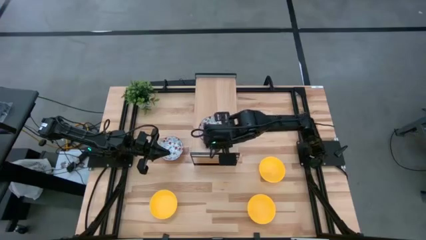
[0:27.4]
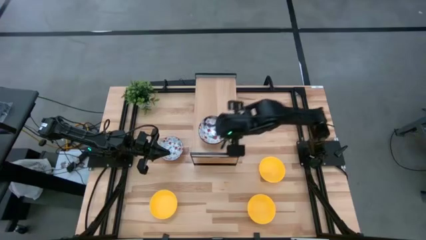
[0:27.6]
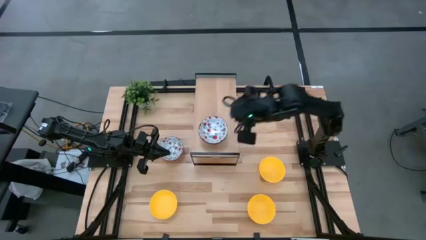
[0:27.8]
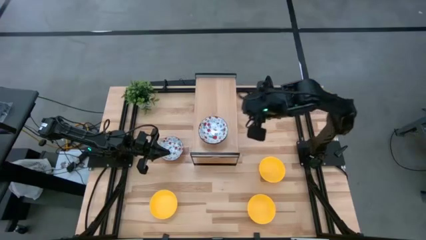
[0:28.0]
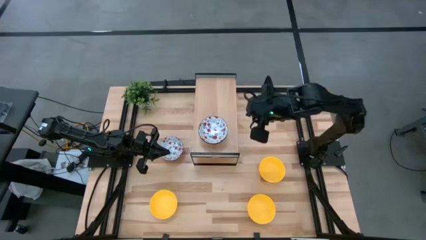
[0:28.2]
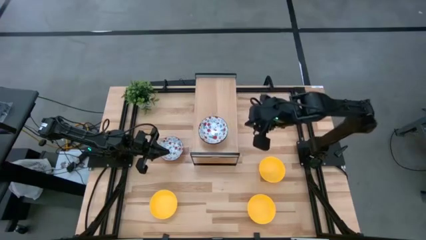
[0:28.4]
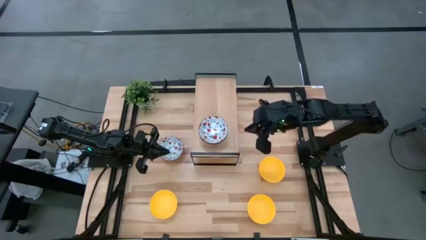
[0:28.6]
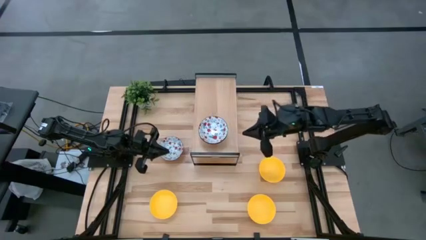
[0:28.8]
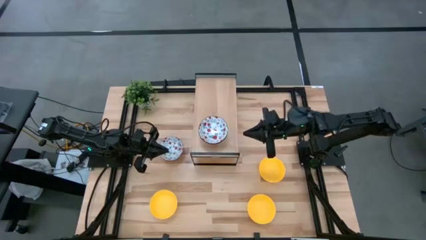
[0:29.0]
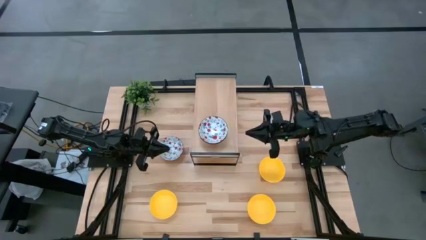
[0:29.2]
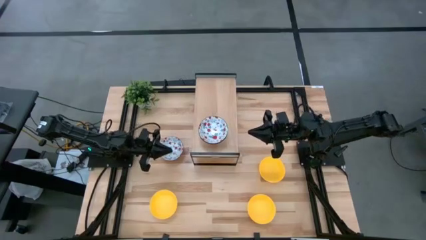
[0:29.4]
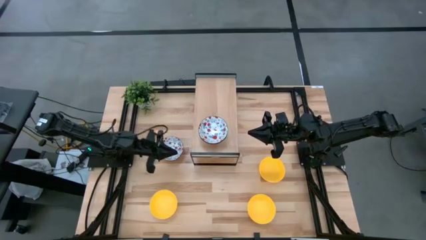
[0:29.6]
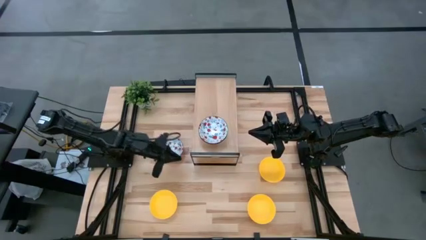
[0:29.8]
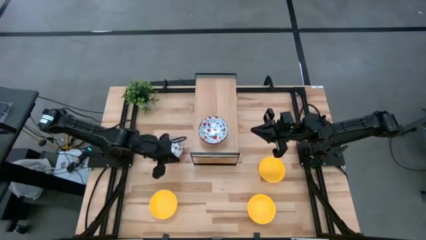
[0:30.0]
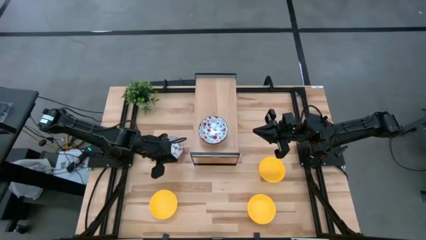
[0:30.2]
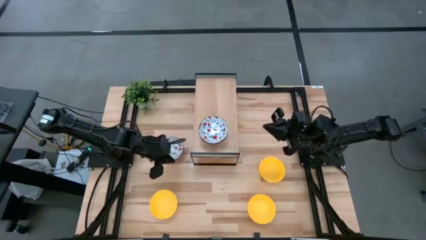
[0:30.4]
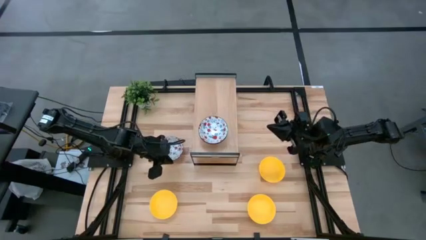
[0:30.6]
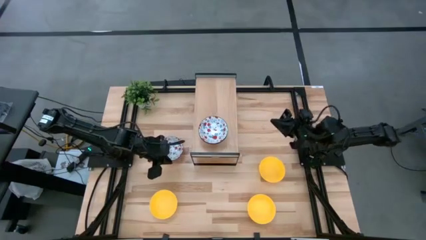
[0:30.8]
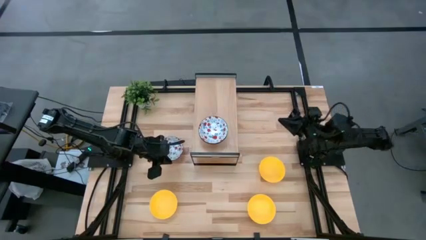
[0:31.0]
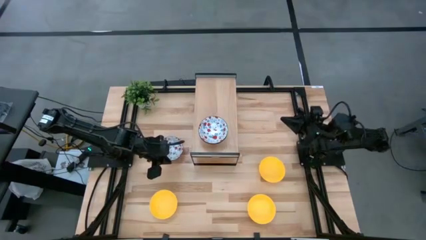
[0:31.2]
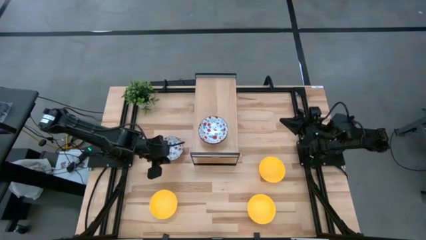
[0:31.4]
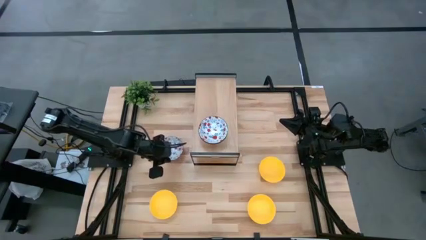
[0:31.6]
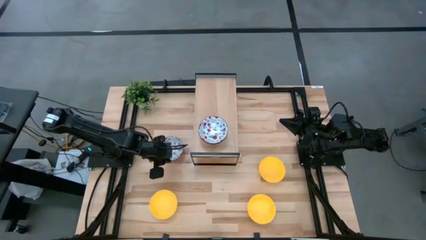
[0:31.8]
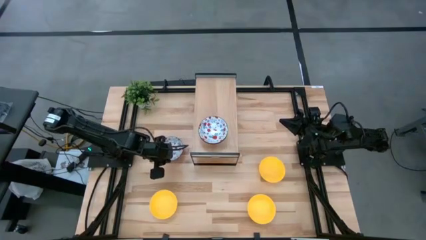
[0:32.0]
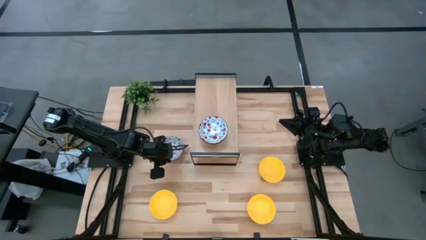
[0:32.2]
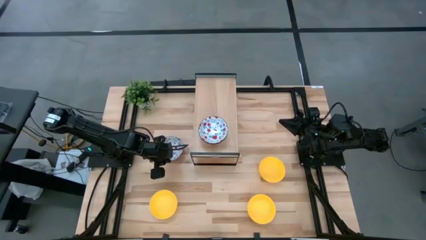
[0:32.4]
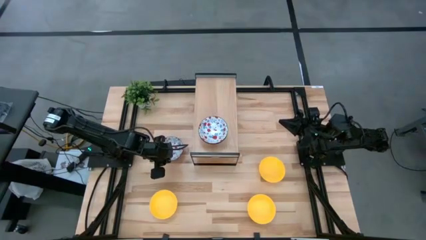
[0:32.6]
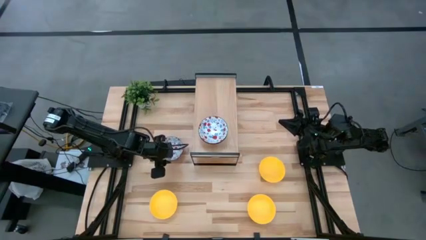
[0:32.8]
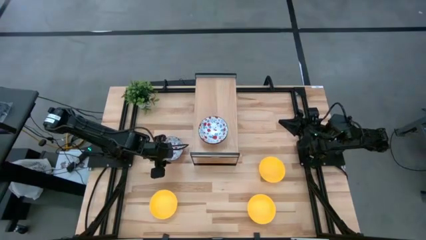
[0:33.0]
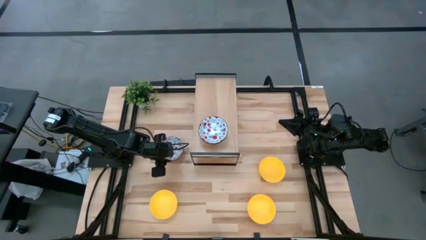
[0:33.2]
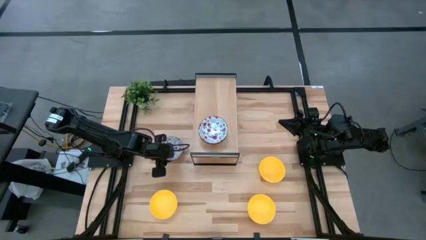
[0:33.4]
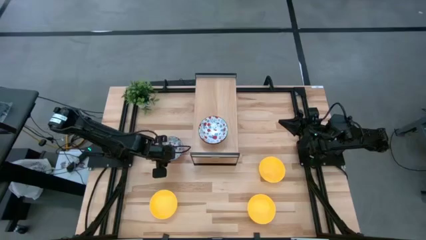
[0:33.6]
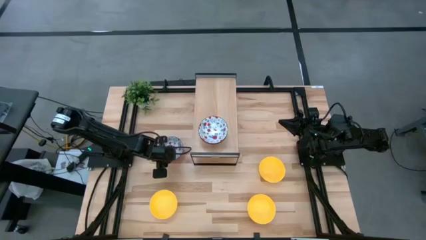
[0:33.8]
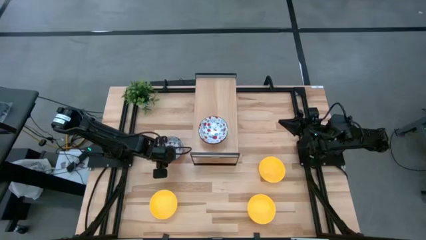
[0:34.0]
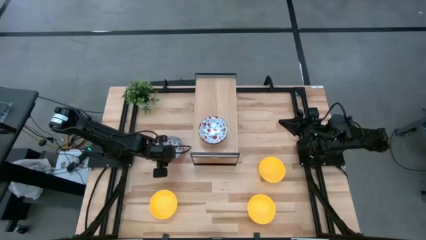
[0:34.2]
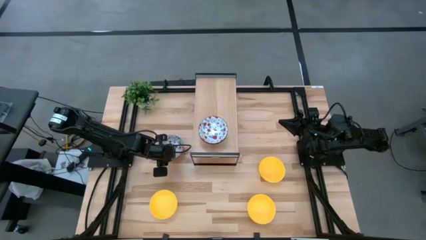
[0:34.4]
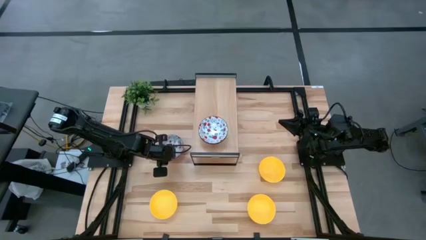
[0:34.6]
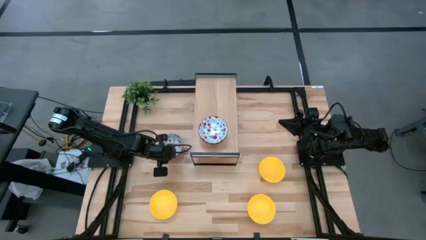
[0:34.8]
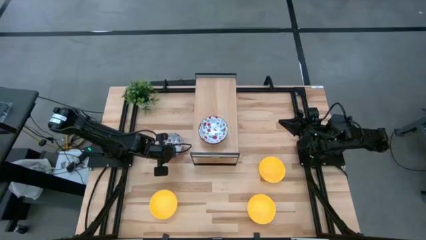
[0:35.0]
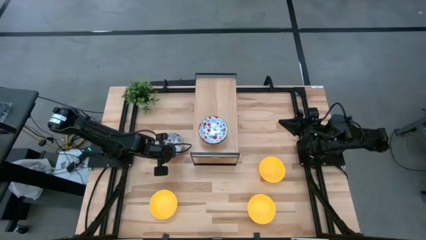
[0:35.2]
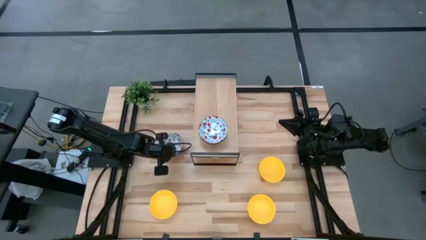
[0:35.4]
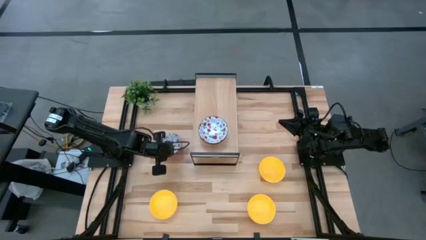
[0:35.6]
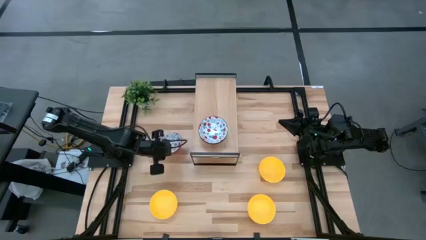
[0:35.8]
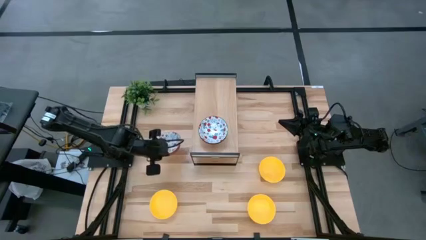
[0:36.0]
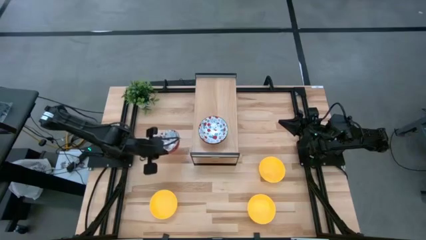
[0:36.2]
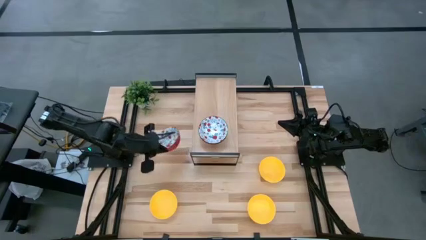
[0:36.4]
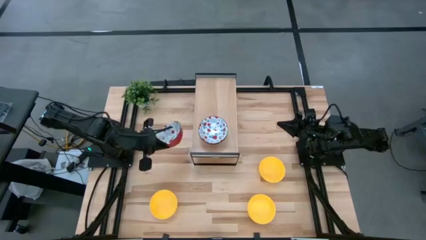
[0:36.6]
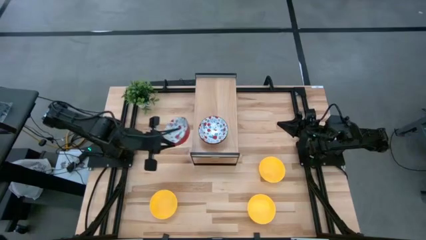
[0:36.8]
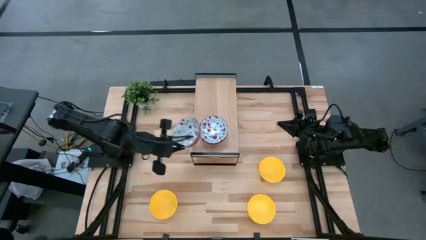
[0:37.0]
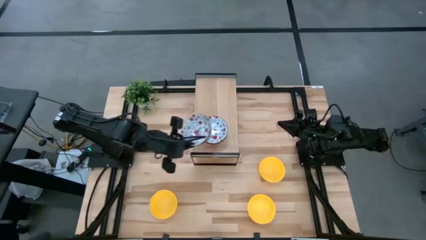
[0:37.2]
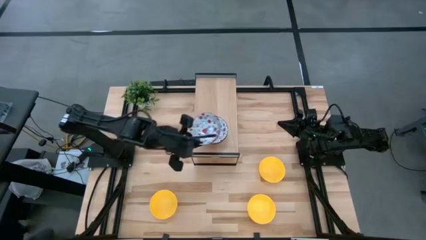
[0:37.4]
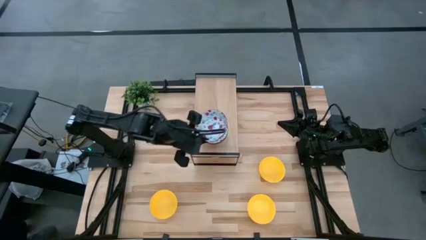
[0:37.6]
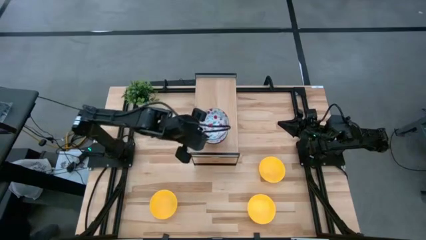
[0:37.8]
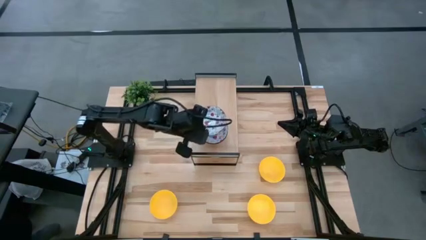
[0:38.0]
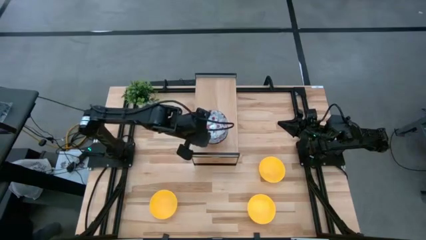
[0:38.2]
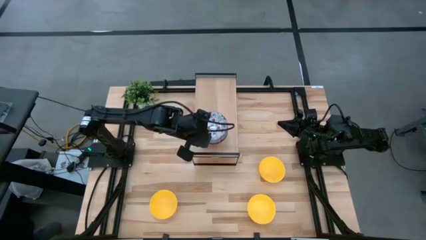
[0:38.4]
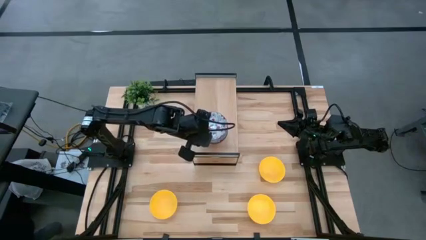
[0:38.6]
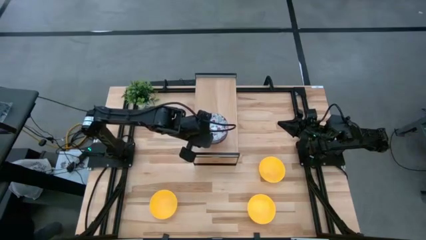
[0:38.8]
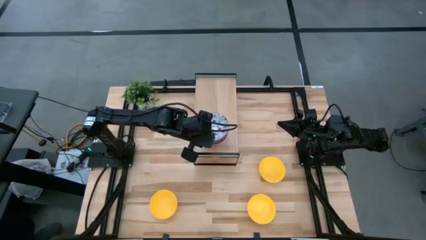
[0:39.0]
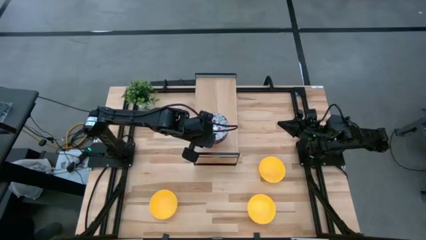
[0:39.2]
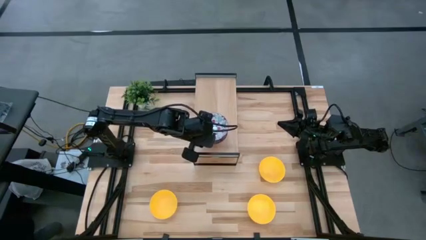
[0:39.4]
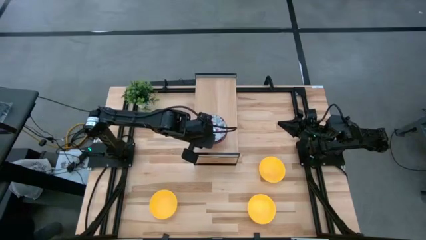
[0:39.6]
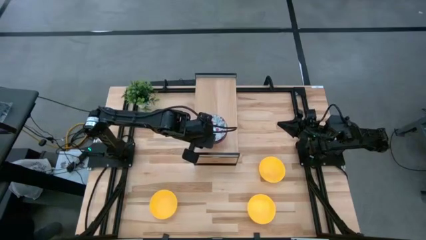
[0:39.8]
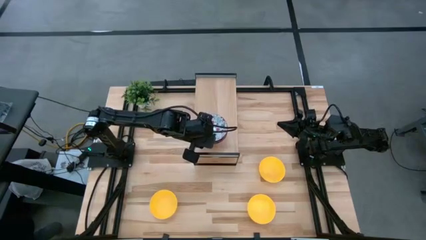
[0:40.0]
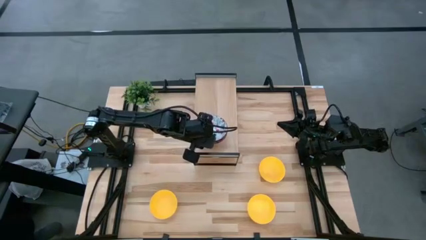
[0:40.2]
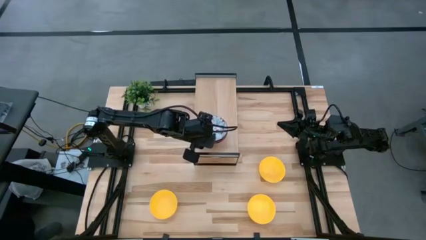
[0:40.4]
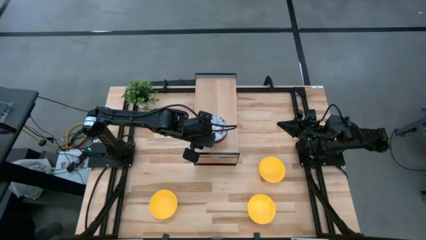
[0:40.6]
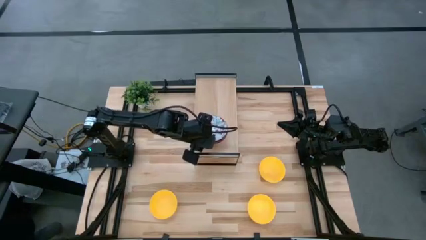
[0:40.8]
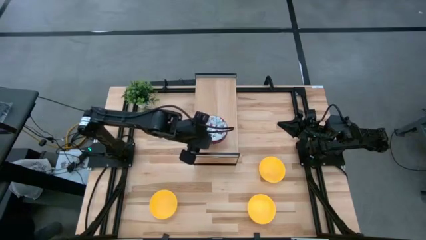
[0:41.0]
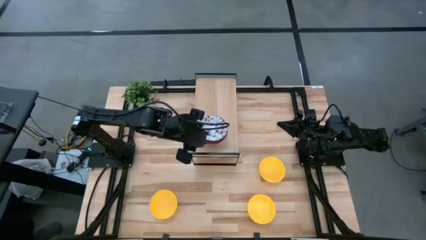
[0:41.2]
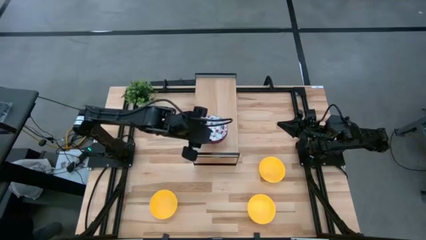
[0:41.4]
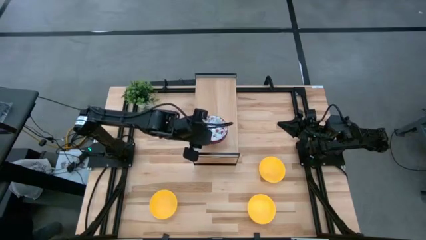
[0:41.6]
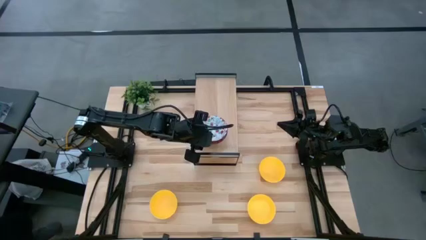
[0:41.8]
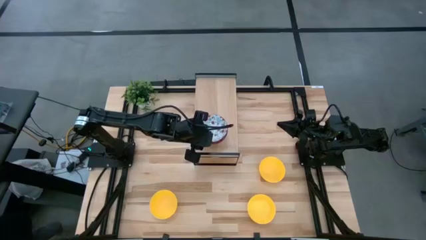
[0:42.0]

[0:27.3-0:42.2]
Task: Pick & Place Mini bowls
Stack the white patterned bowl on the white patterned bowls on the shelf
